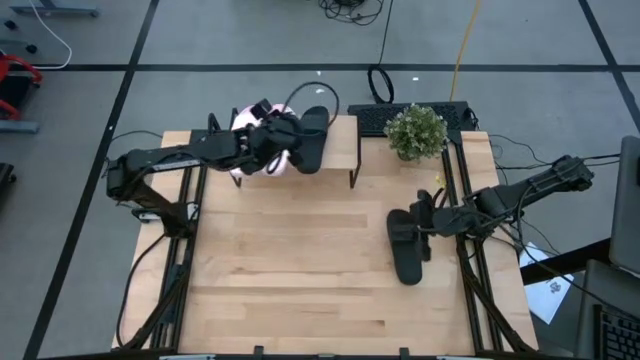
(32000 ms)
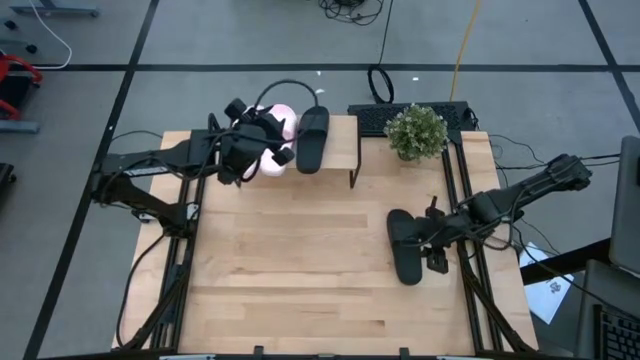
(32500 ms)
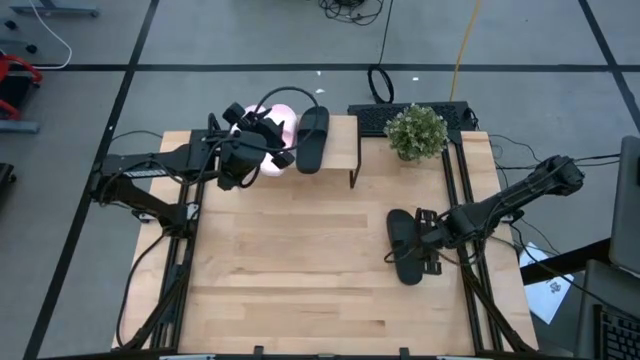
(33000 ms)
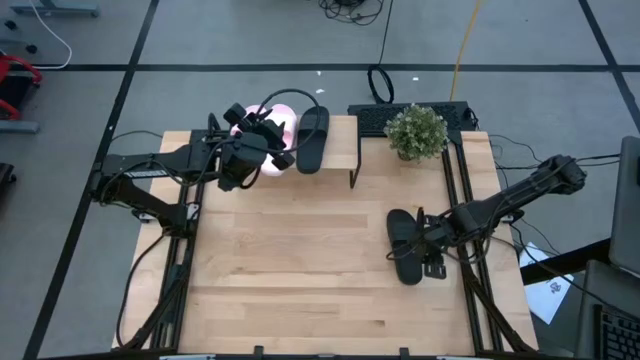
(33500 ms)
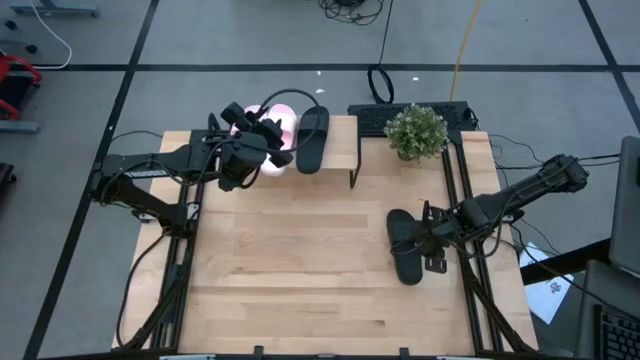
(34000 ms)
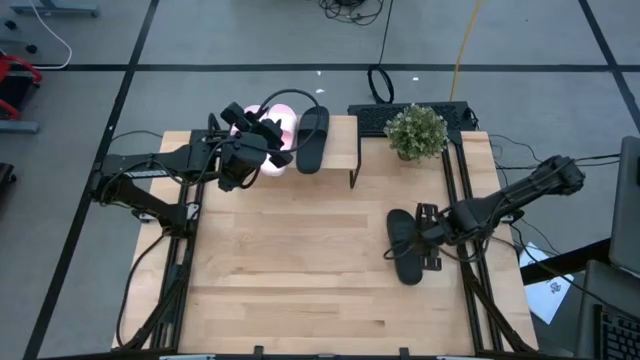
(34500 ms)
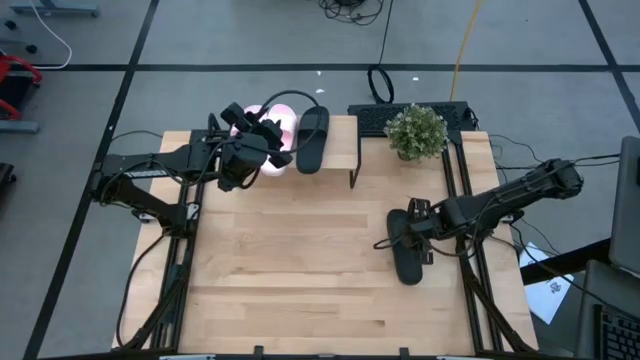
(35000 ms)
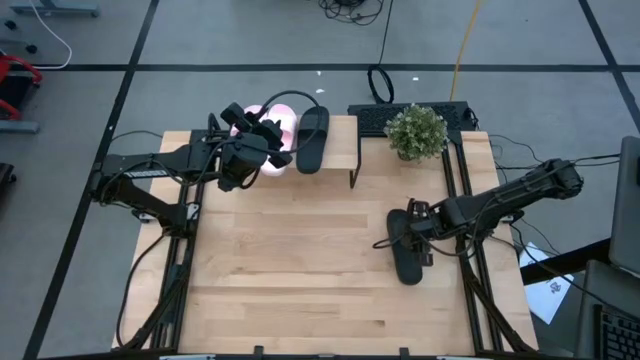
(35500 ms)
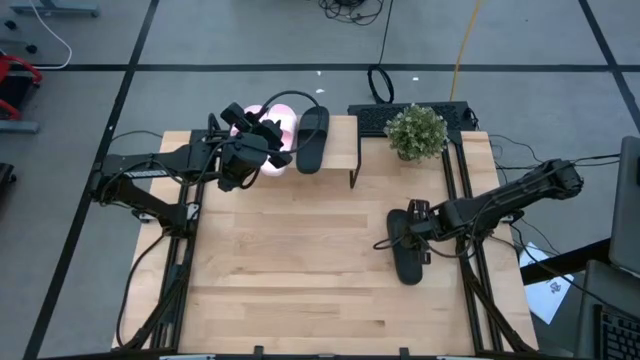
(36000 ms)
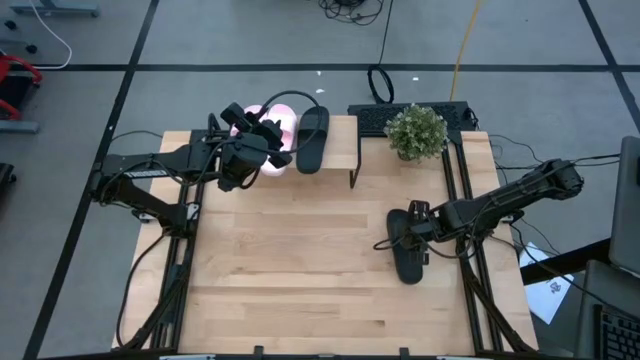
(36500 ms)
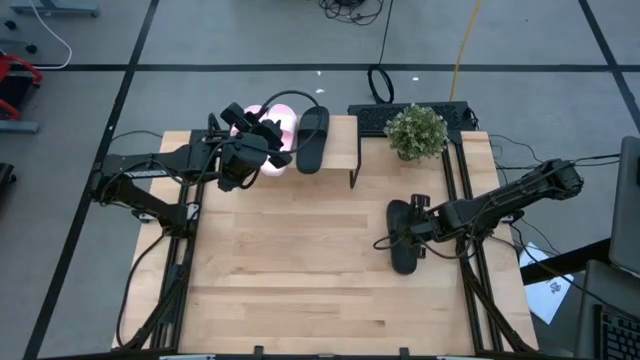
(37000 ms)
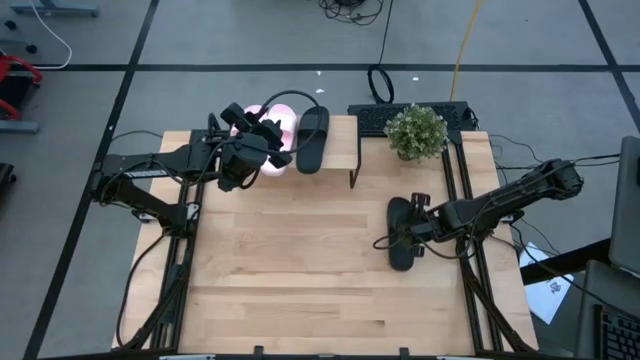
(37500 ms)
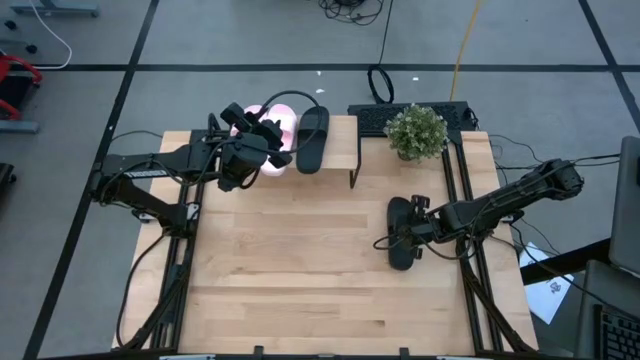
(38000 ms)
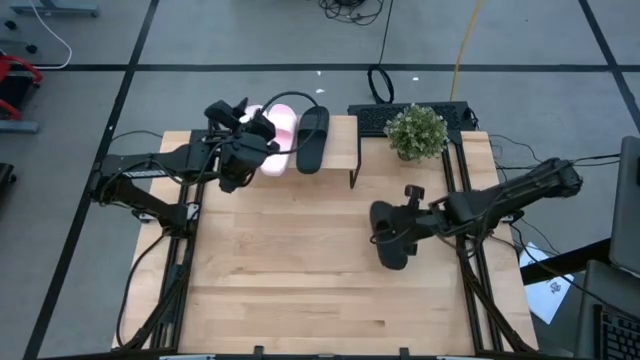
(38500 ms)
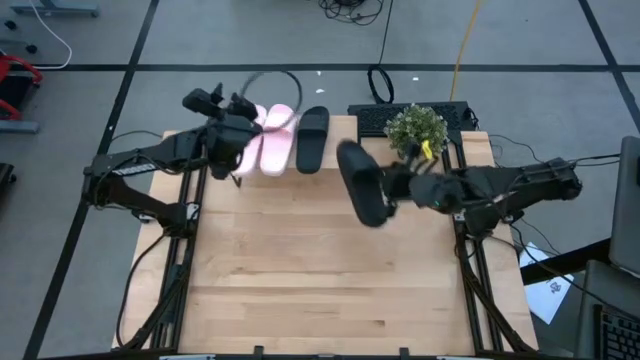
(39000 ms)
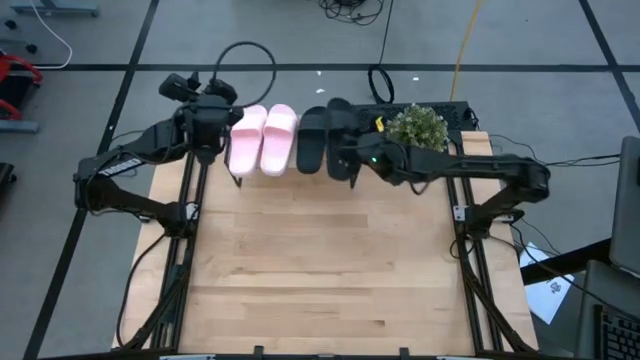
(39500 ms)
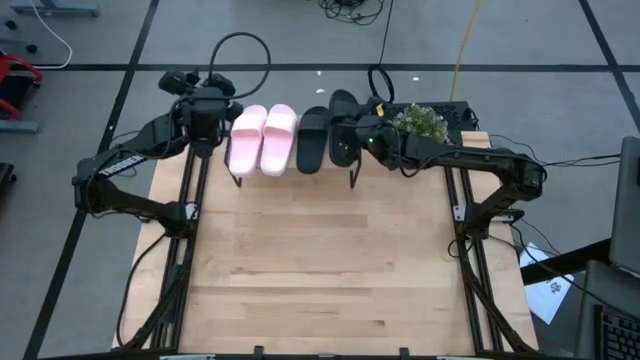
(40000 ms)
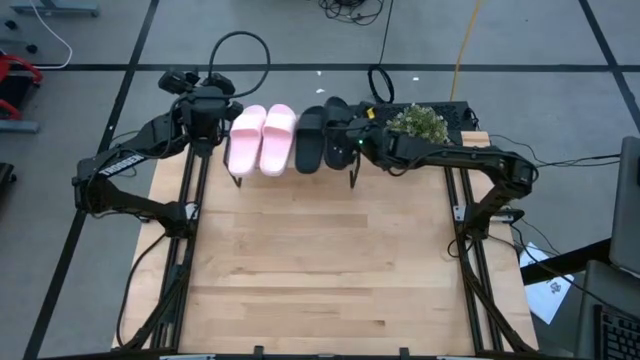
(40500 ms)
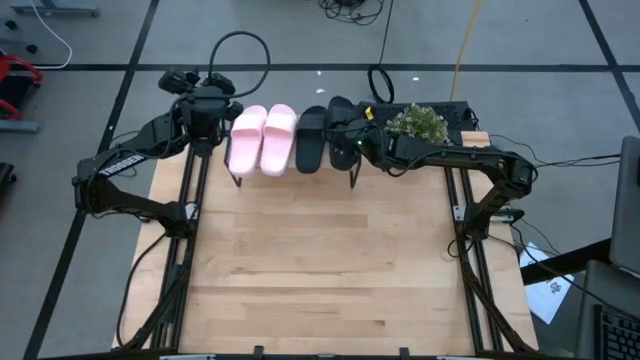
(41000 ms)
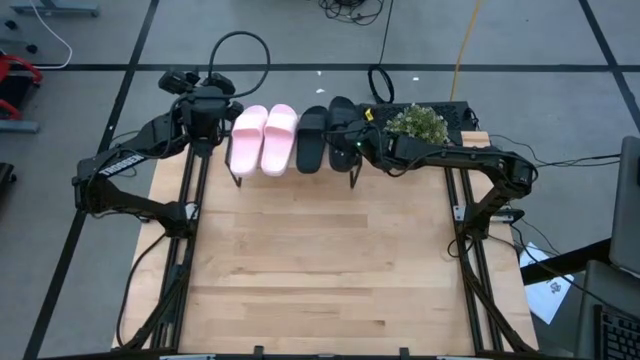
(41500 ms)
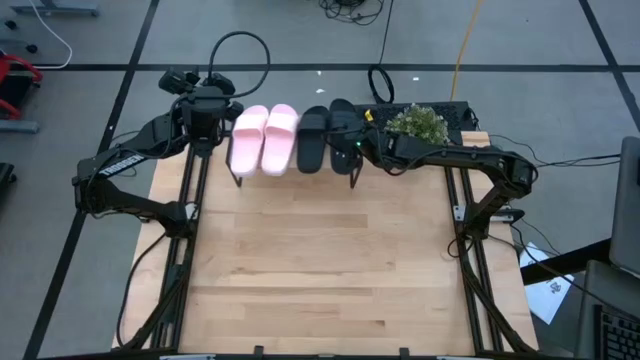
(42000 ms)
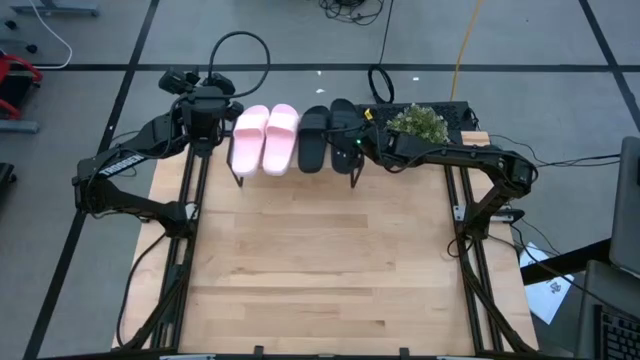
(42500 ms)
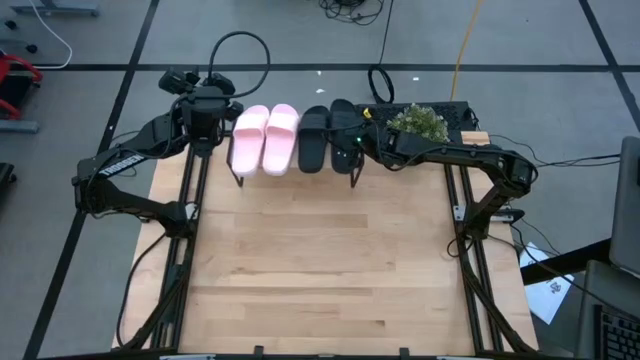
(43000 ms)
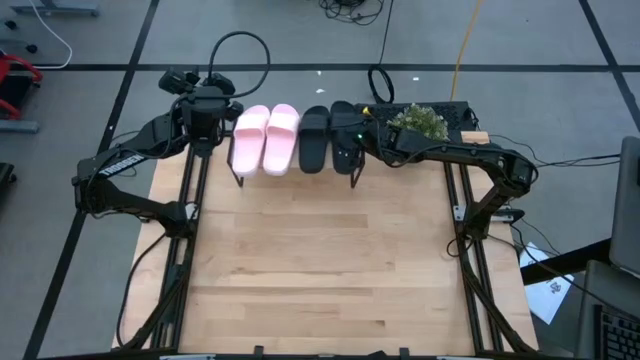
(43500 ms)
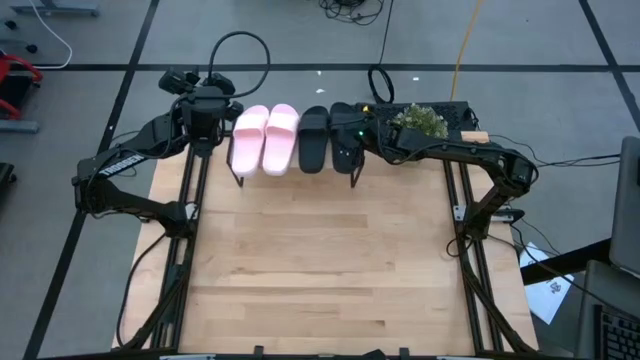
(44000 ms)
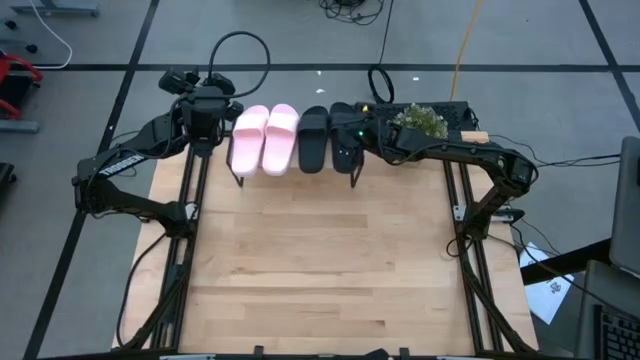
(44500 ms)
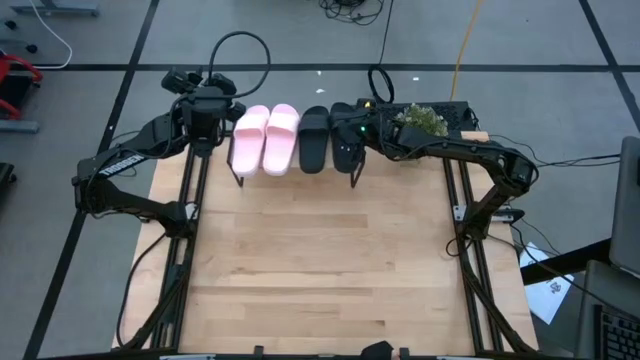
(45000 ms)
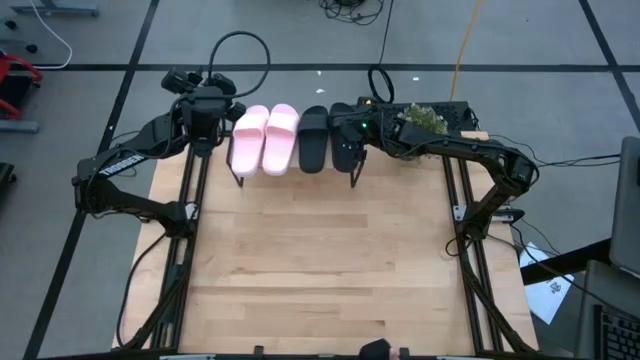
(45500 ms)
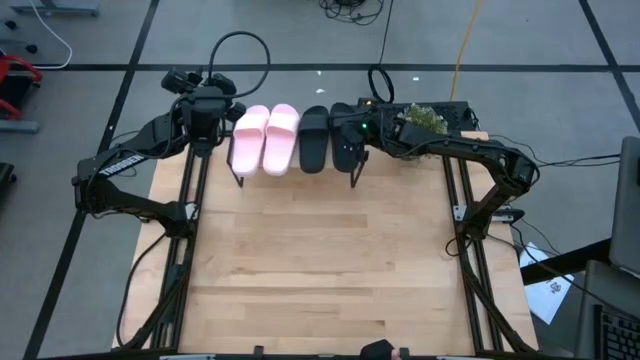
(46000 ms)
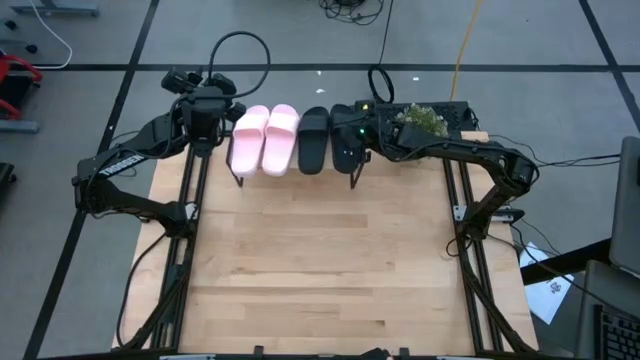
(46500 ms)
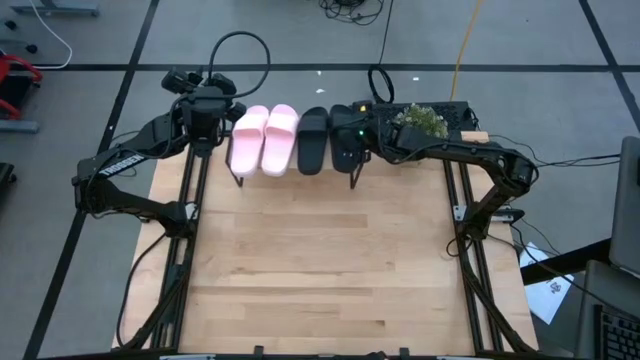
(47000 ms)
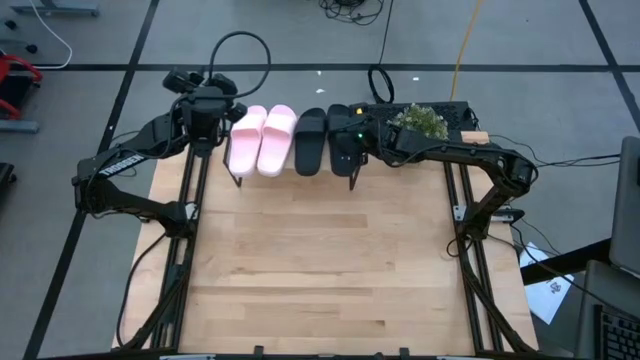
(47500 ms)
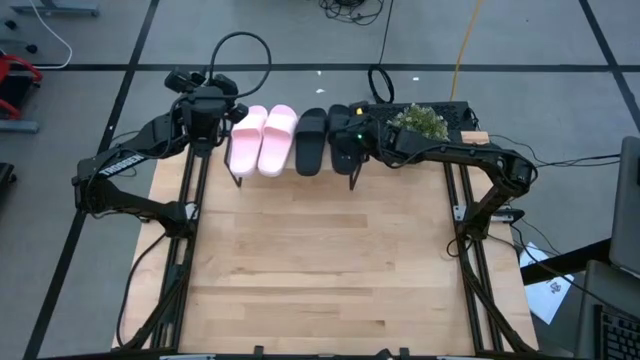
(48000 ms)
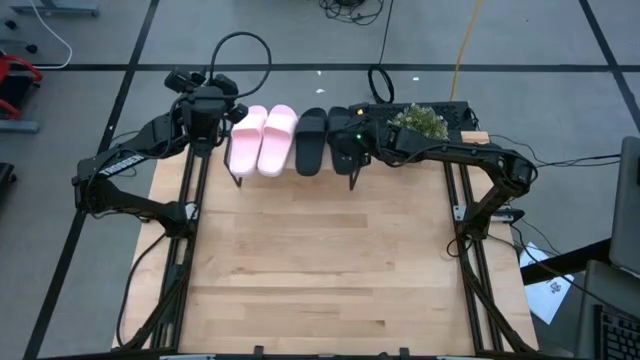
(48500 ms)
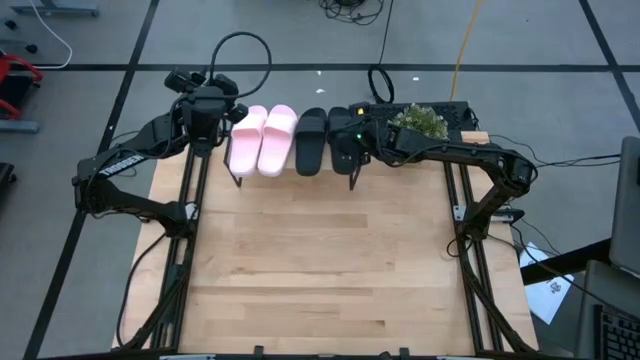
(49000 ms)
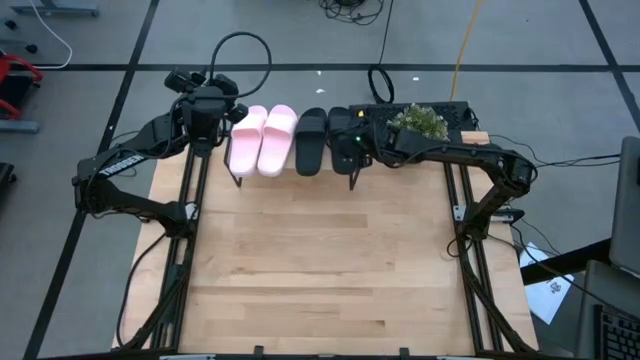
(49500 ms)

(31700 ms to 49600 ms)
Task: Pick and place slides into the shelf
Put the black slipper on the shelf
